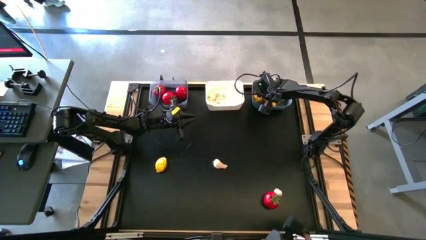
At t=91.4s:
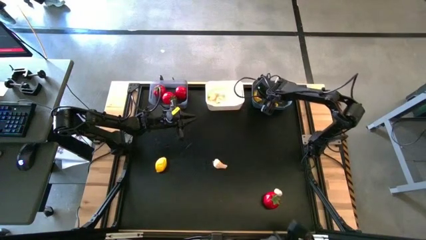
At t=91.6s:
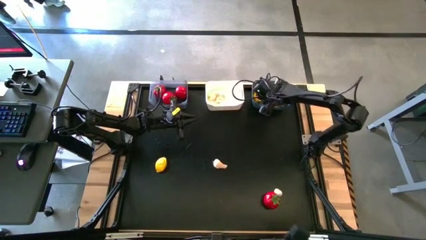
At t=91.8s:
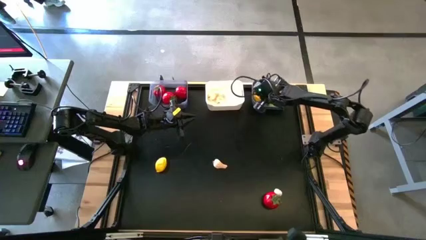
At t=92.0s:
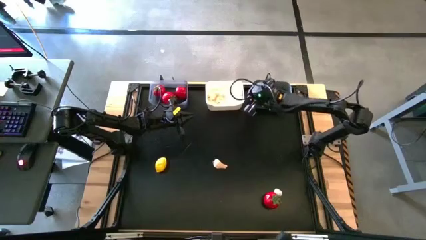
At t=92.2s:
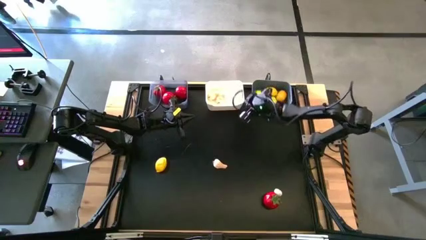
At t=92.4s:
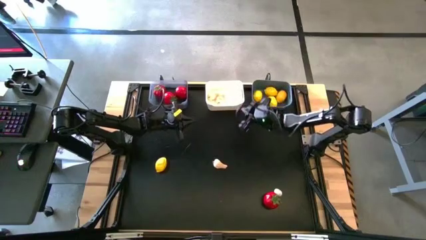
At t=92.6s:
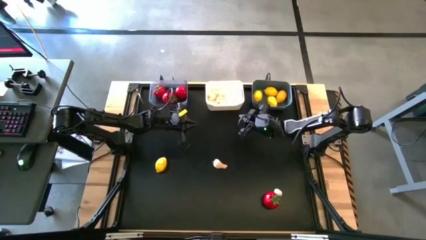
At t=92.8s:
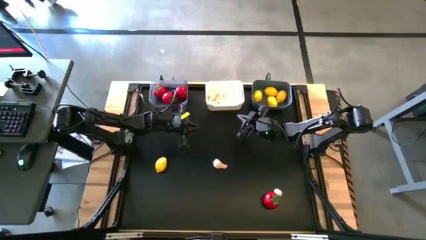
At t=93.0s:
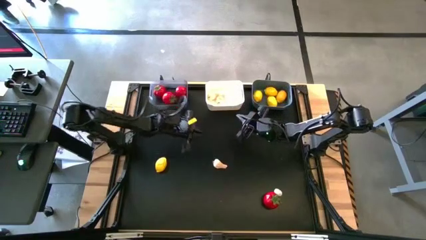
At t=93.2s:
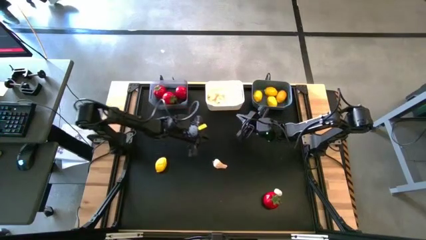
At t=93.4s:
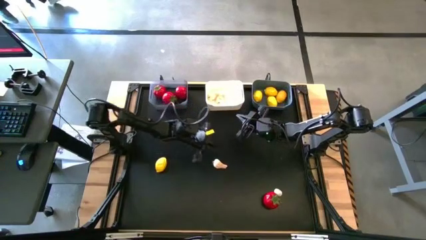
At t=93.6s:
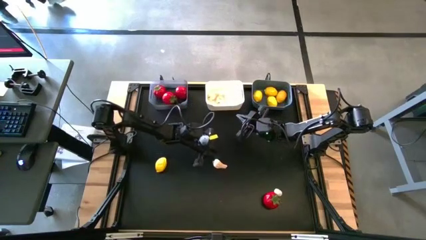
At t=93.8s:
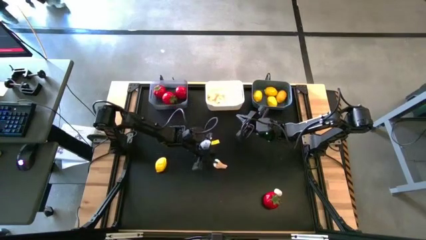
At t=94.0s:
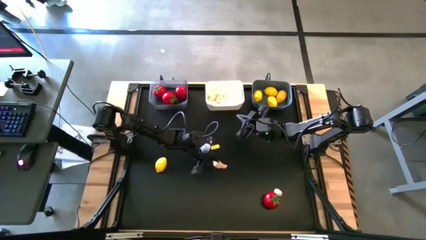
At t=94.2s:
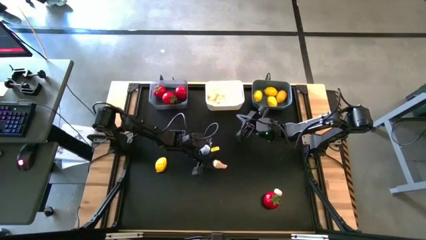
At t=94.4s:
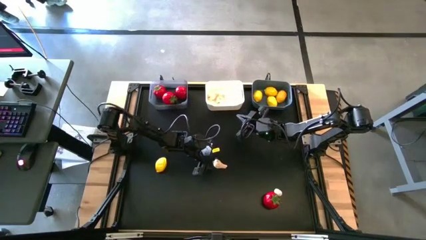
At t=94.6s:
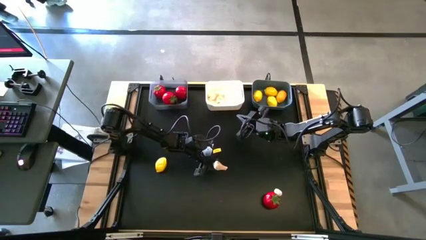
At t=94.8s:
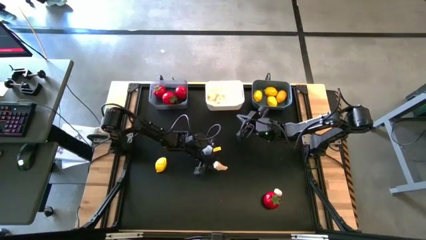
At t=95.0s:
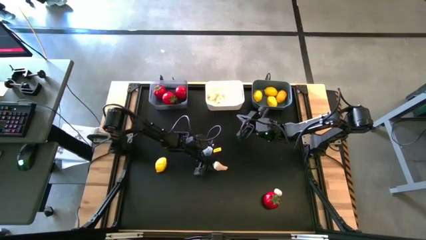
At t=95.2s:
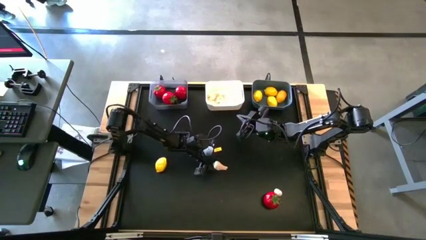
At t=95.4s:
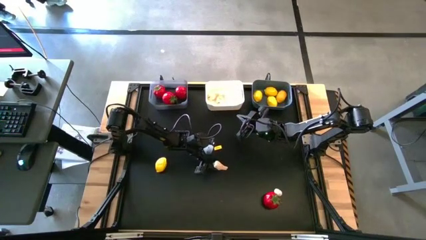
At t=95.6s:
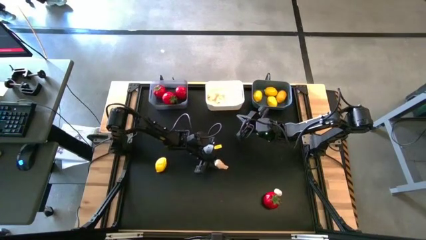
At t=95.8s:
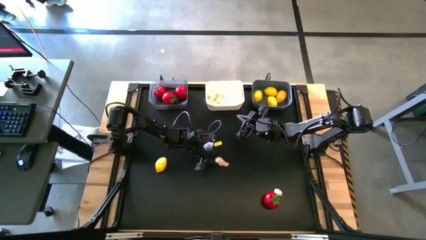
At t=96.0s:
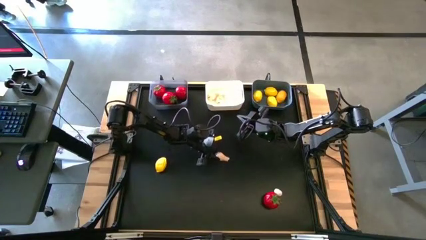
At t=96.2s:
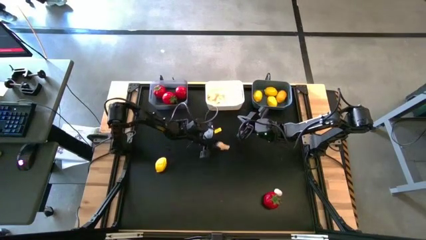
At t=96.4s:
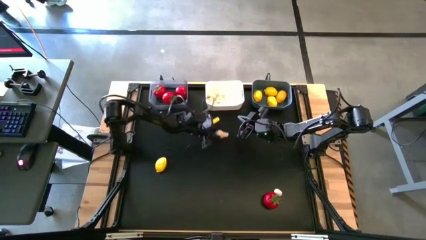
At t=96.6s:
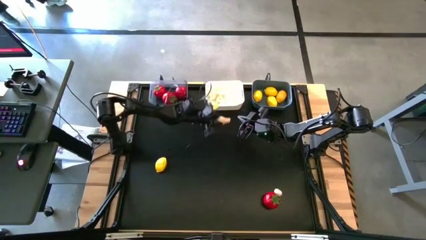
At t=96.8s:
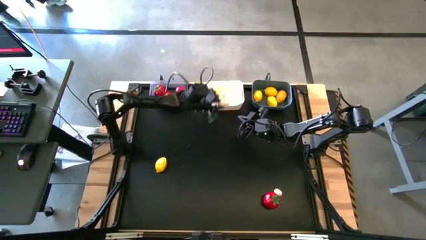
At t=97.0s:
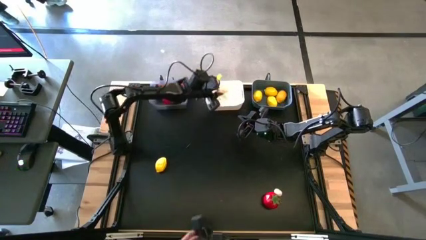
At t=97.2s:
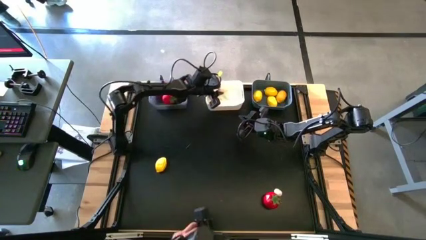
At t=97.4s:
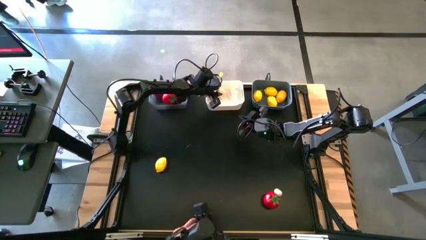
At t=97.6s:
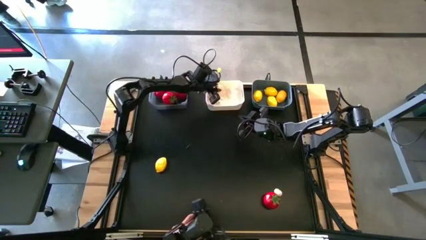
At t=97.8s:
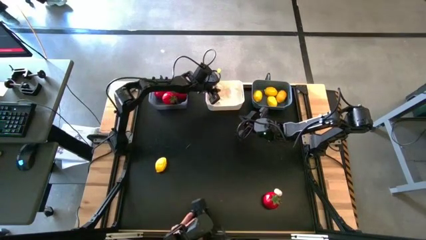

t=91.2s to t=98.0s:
Task: Sort produce into baskets
Put the garlic into the white bin

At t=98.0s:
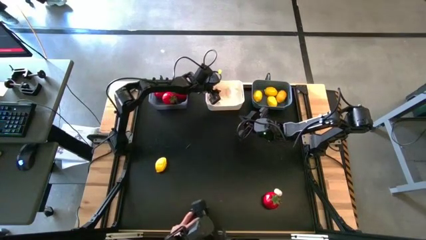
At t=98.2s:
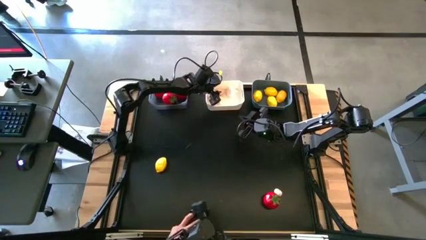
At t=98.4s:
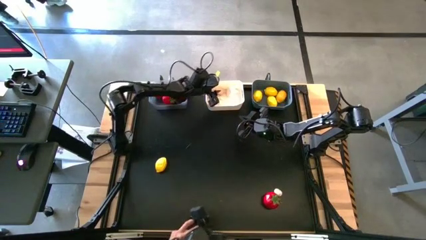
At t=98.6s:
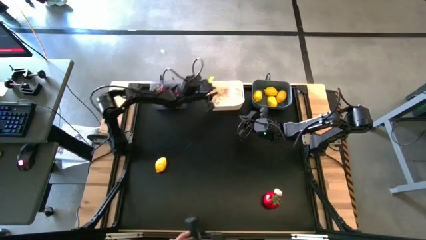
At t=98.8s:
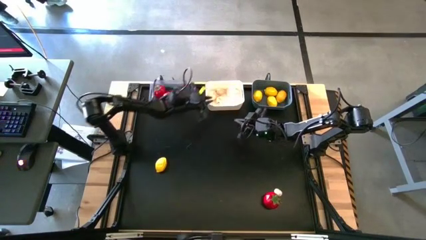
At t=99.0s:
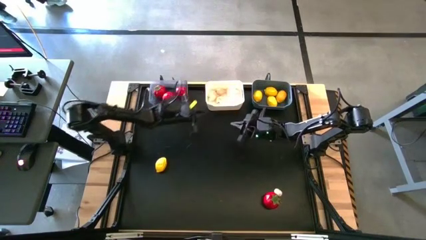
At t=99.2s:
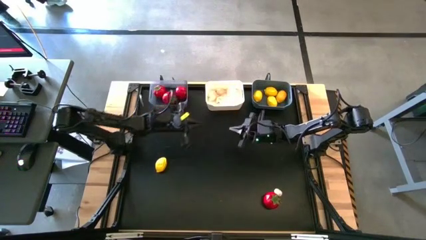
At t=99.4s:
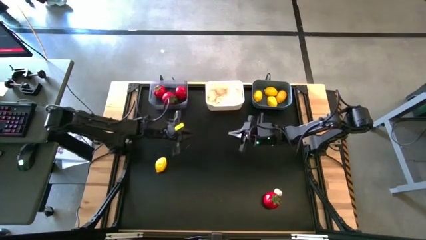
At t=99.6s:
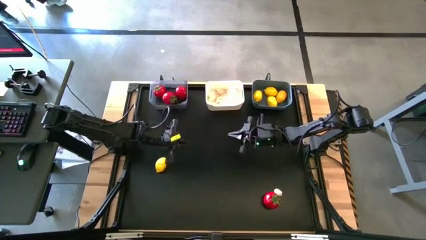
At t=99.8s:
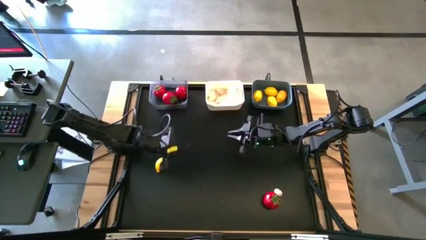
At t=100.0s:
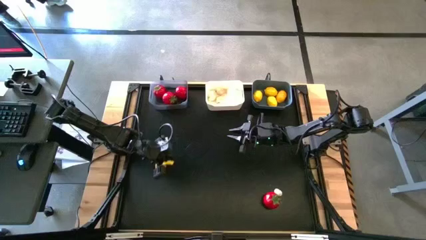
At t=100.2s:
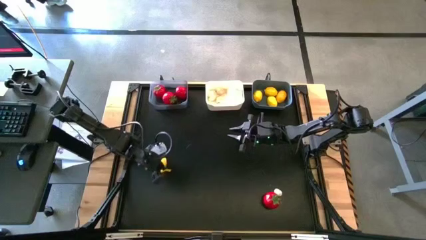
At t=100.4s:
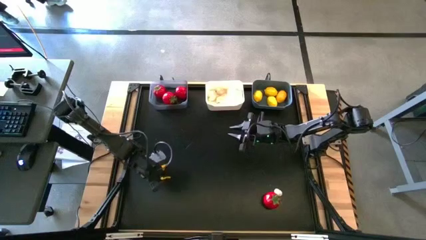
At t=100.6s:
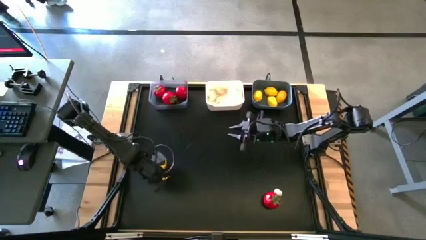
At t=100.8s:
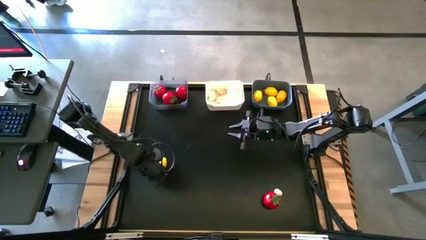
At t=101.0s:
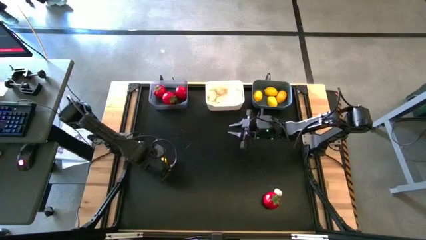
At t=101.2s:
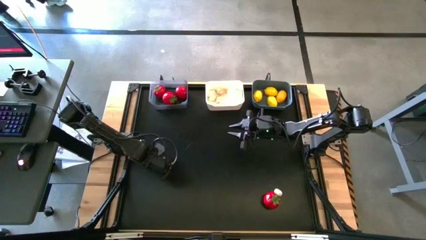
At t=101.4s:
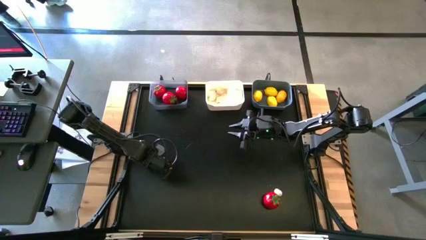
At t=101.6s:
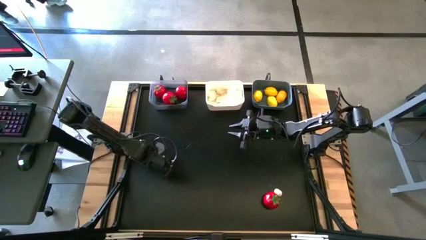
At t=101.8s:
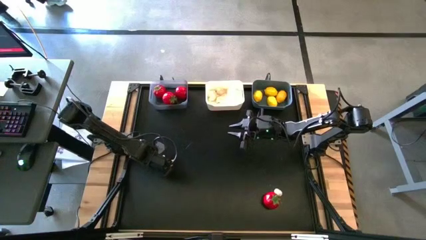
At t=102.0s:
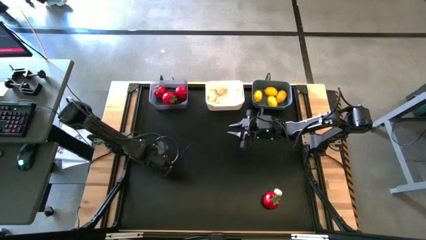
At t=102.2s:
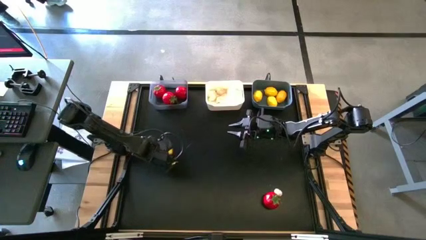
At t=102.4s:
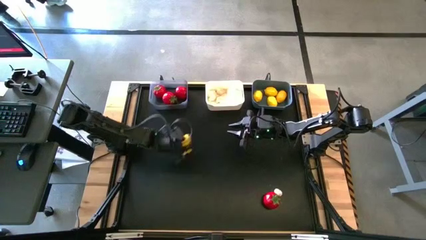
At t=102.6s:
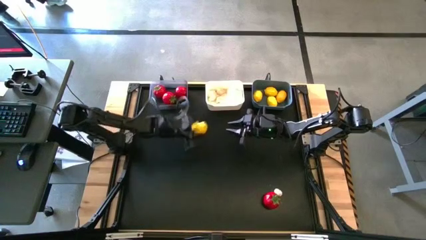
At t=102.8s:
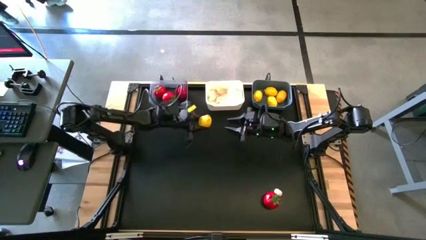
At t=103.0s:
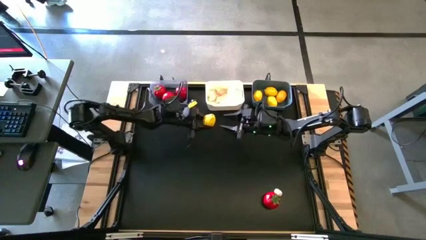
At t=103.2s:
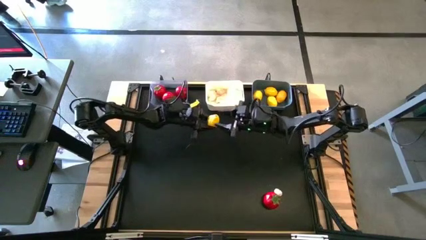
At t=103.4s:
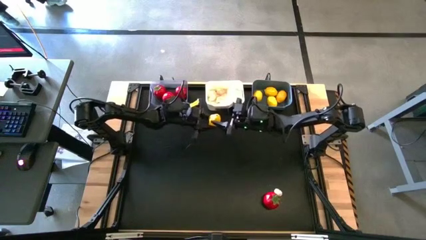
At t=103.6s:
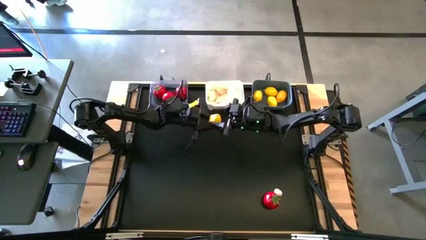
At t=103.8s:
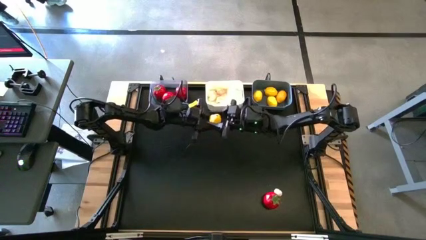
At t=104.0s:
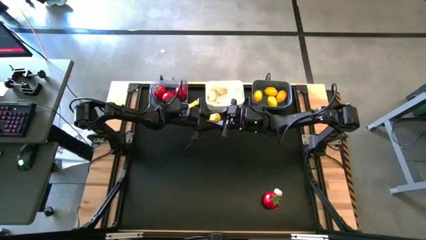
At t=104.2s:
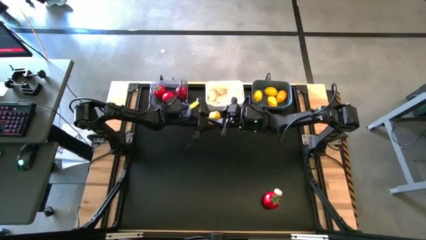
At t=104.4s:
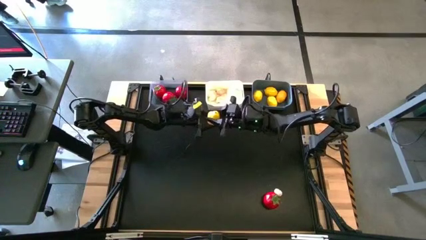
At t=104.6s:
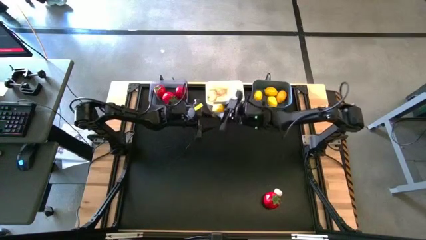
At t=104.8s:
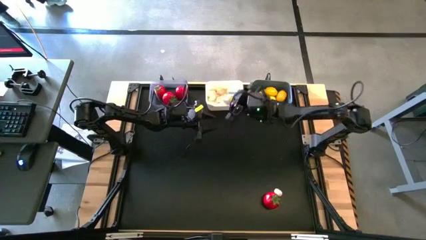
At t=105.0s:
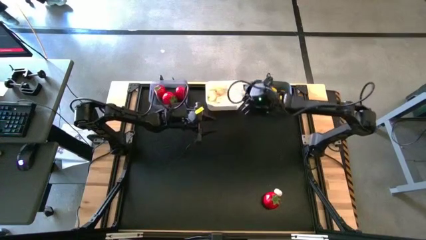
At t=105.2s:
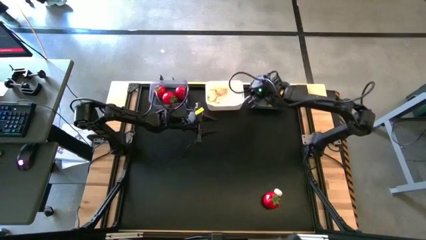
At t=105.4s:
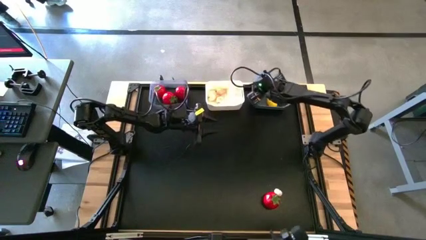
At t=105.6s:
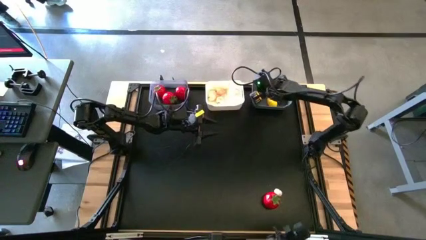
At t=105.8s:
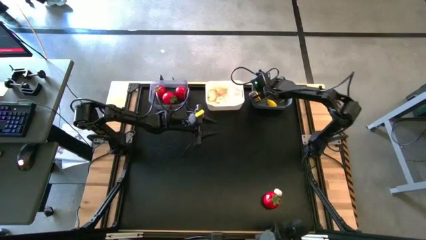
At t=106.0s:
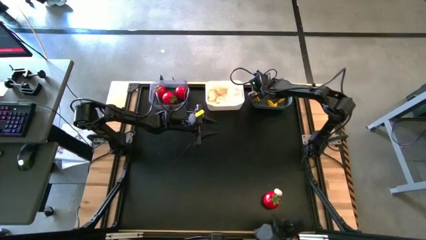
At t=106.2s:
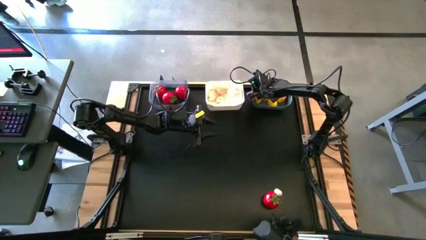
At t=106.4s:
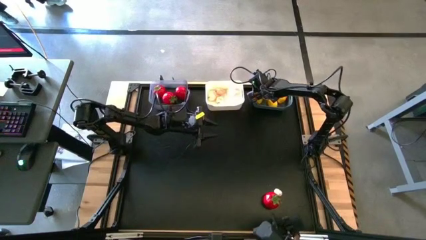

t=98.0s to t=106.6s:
Put the lemon into the blue bin
